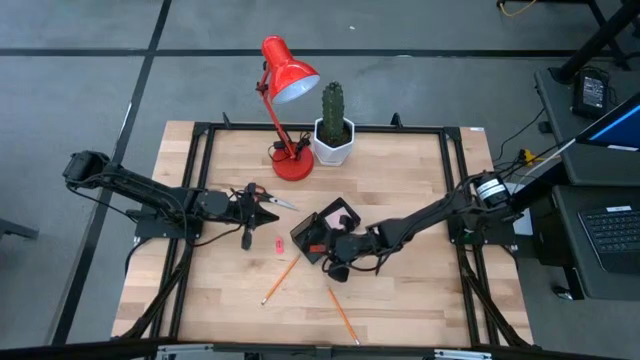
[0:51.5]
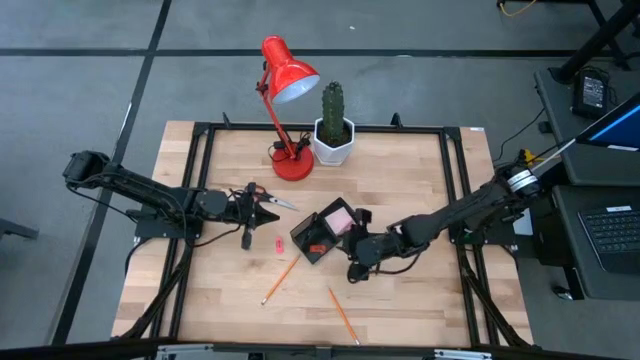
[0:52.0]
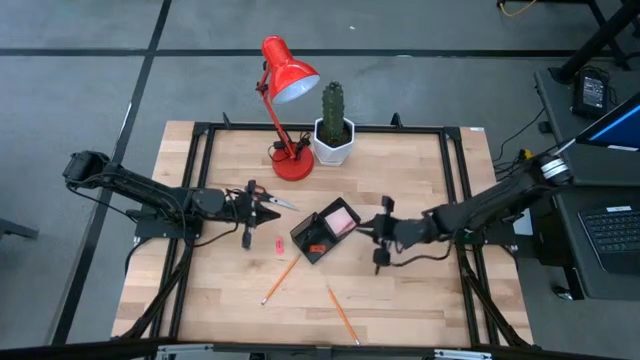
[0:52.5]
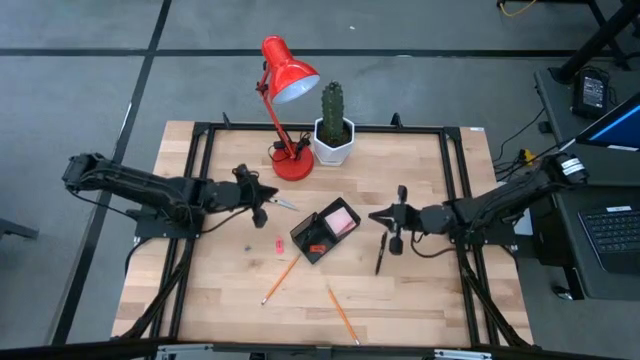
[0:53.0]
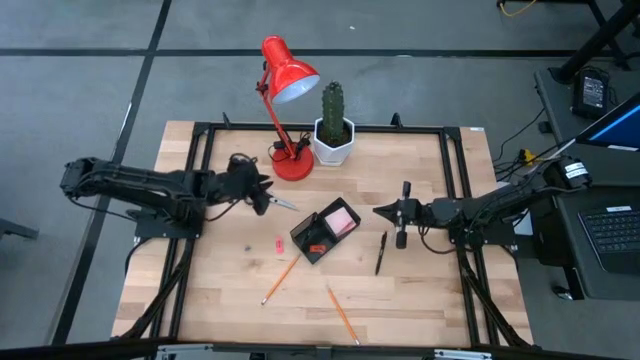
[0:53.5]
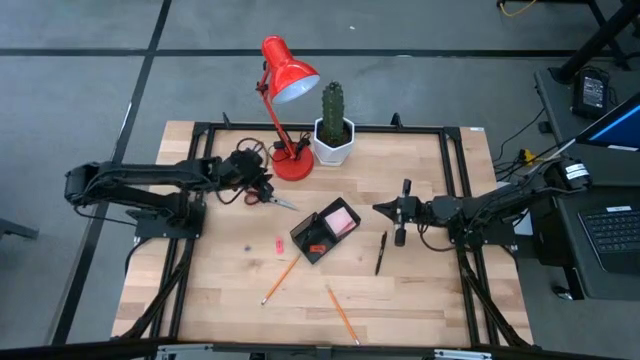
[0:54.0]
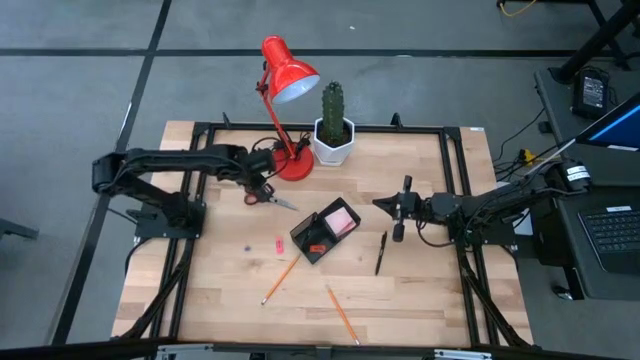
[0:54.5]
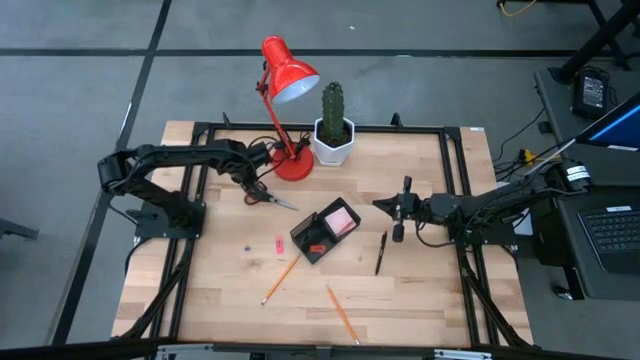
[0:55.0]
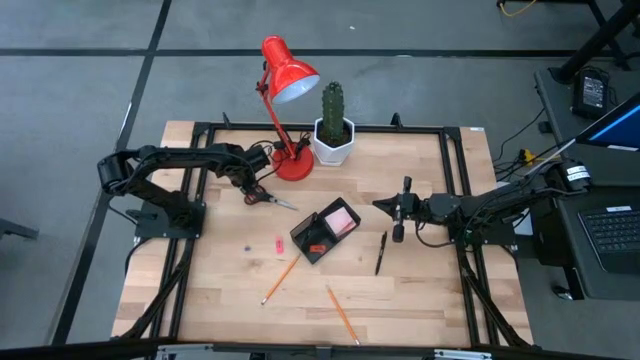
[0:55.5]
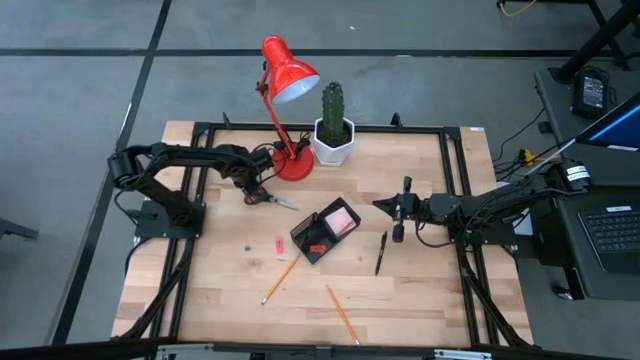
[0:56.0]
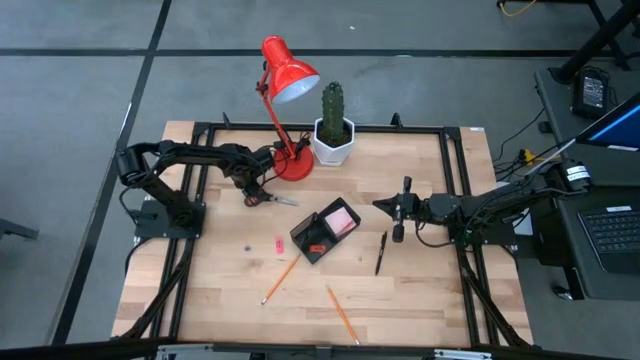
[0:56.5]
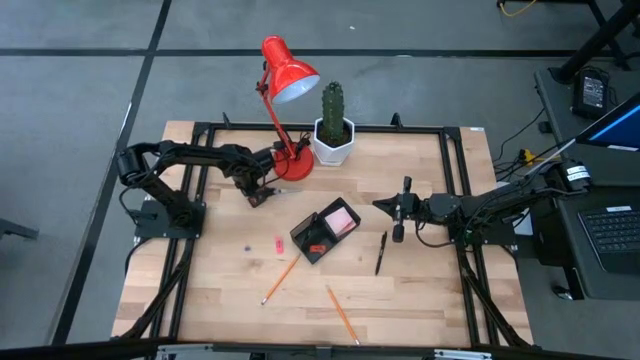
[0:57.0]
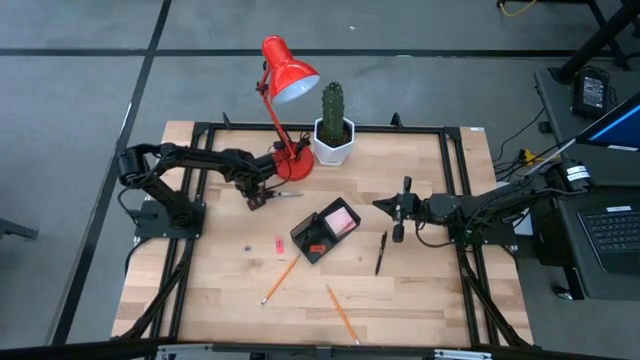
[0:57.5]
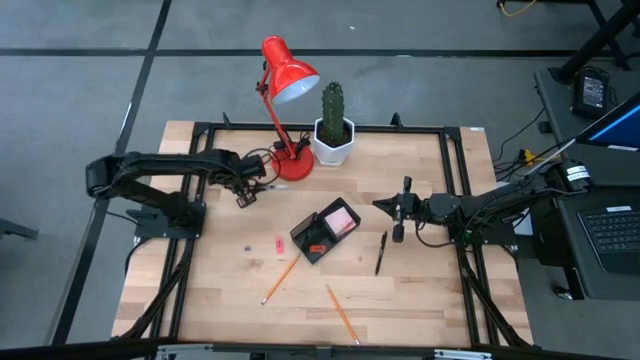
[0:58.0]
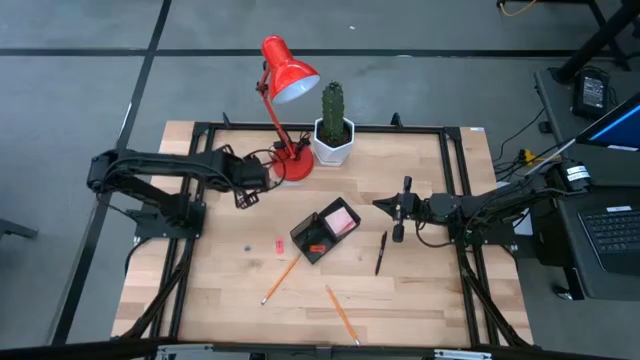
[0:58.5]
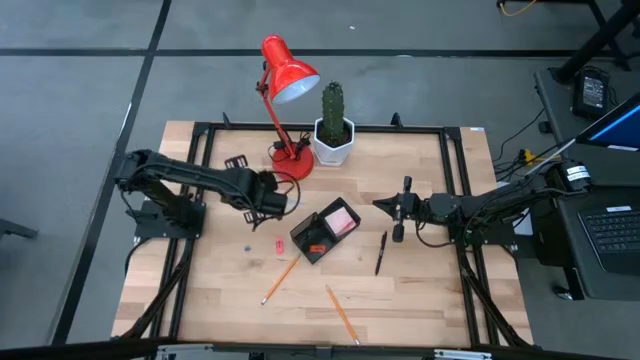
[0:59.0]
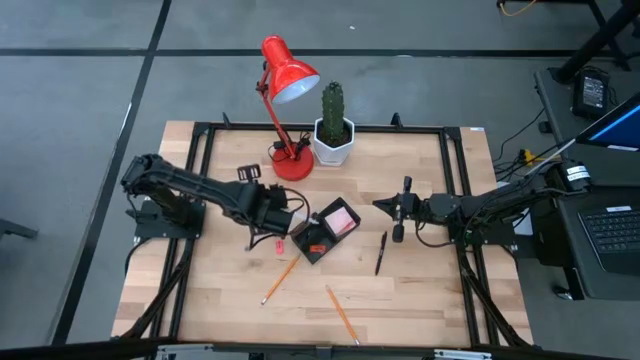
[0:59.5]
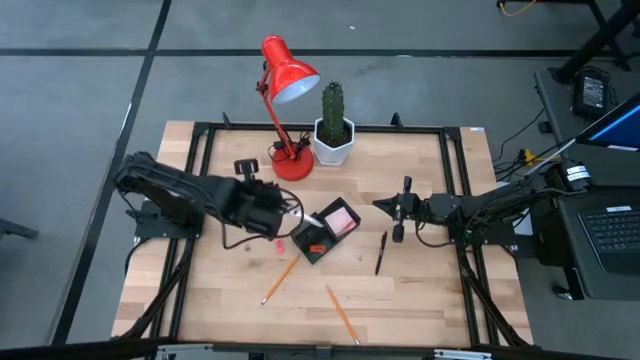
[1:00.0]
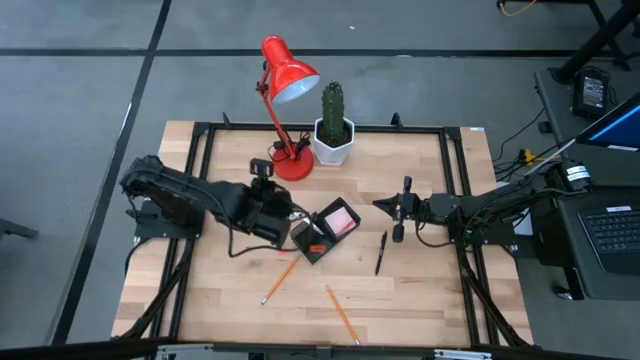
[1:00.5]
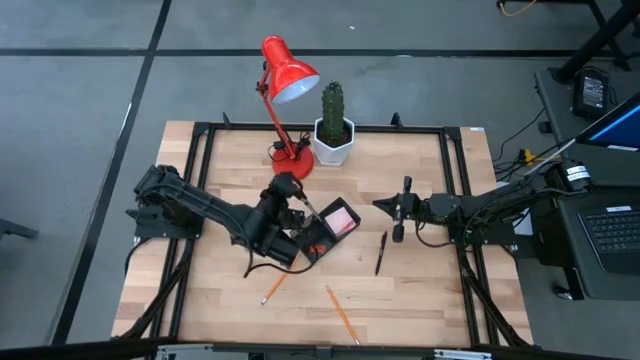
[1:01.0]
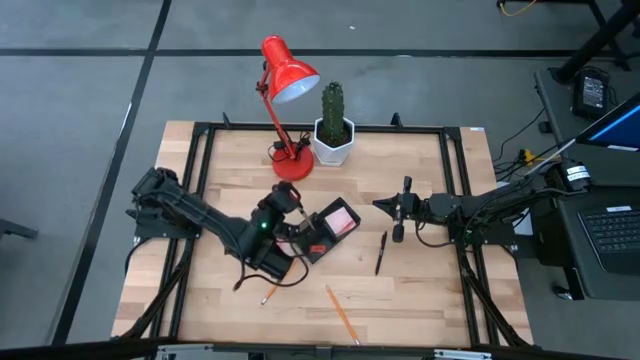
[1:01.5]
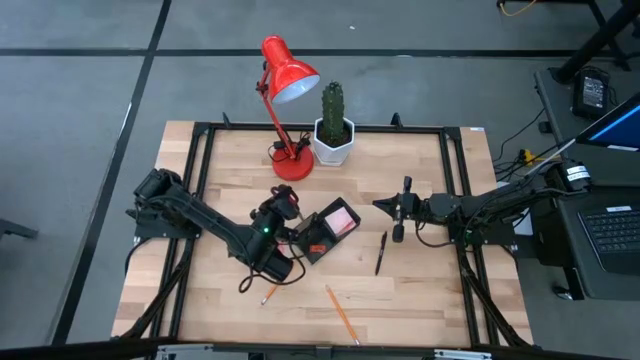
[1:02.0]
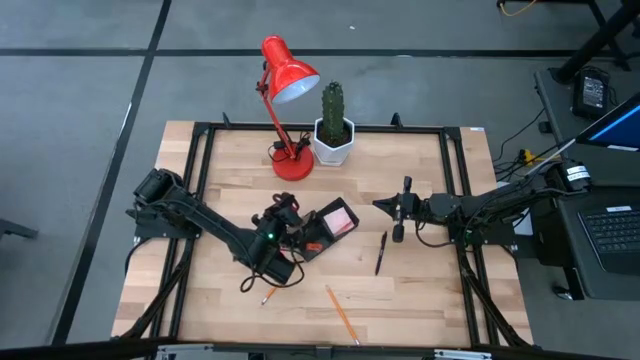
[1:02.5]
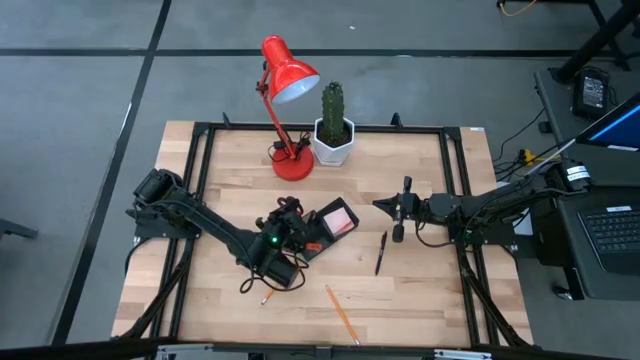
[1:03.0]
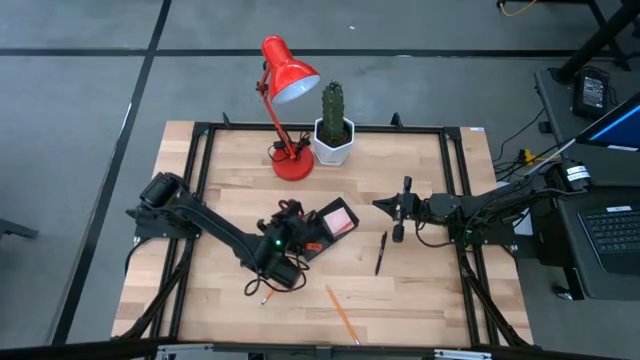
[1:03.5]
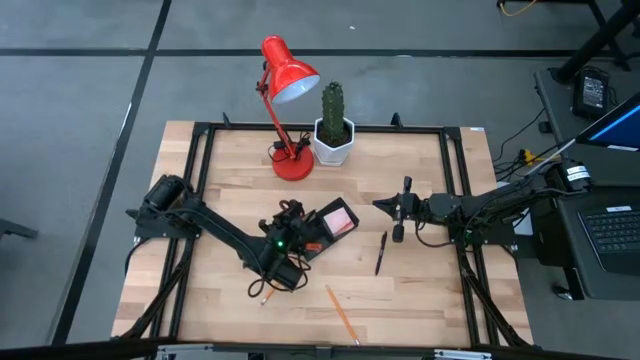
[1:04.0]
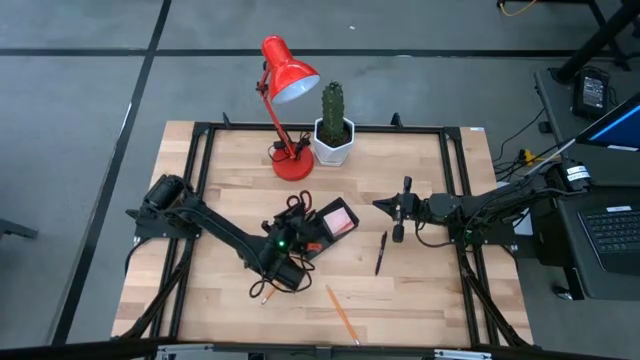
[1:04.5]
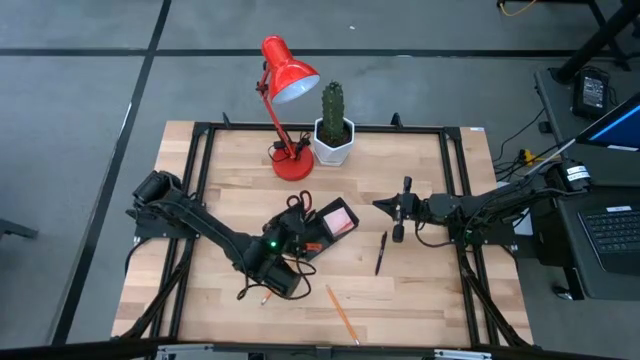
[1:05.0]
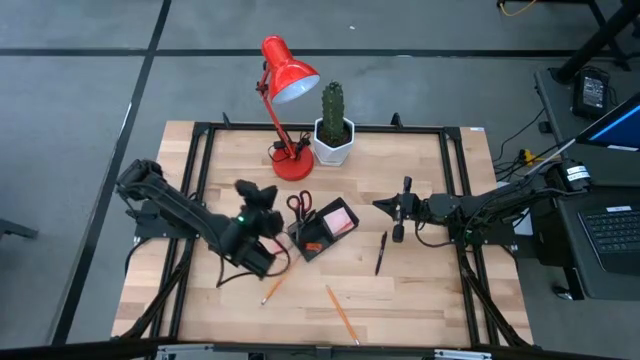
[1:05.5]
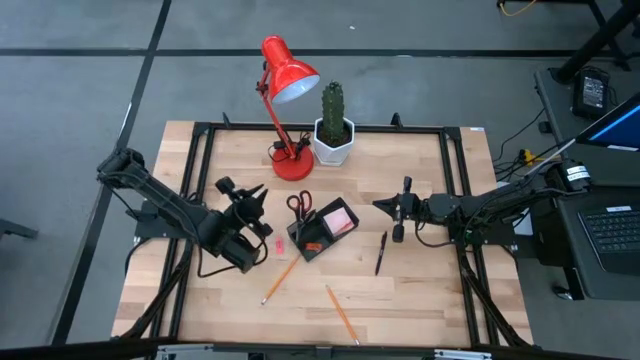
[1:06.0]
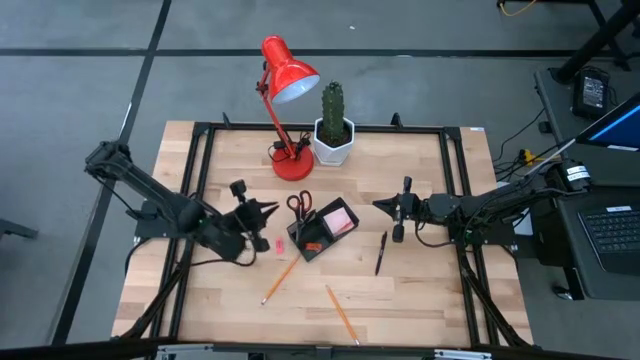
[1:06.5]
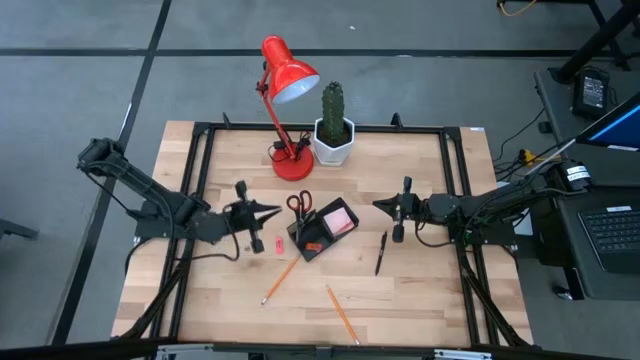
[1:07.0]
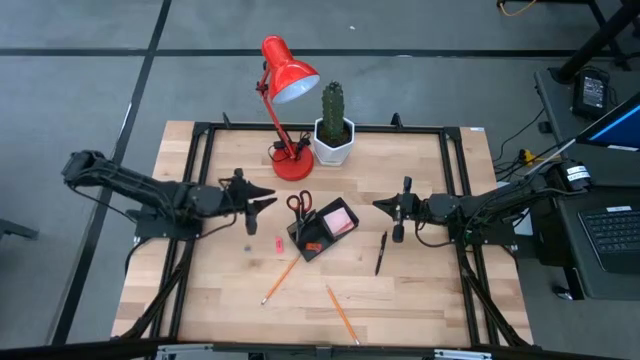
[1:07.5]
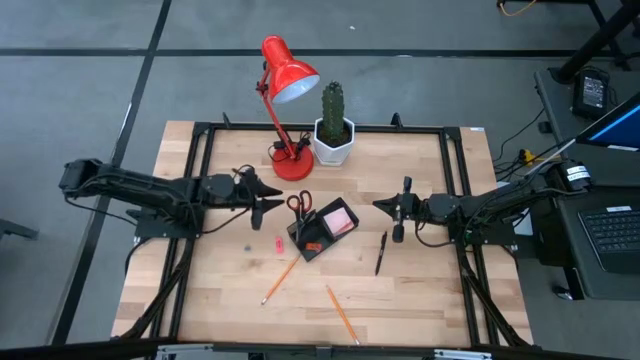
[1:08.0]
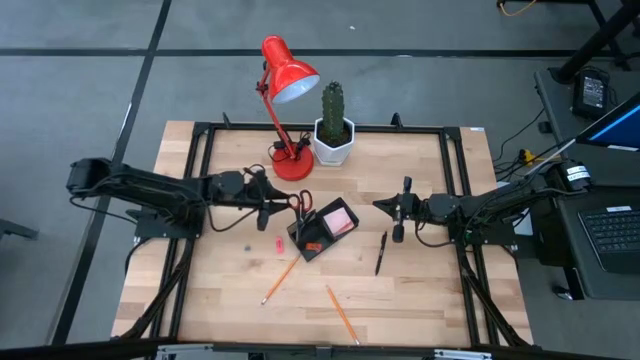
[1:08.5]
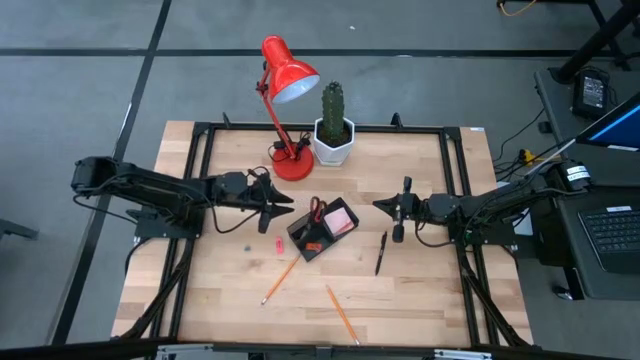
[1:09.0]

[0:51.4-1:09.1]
Task: Pick and place office supplies into organizer
Put the scissors into the black desk organizer
